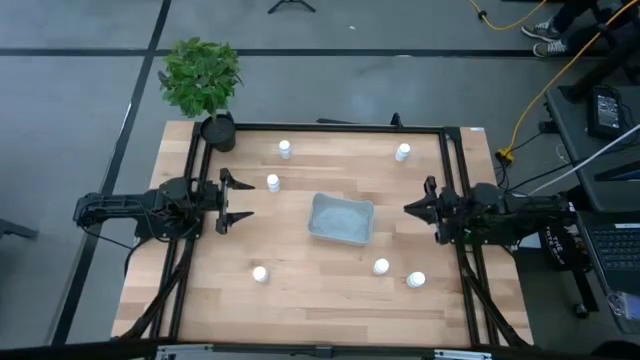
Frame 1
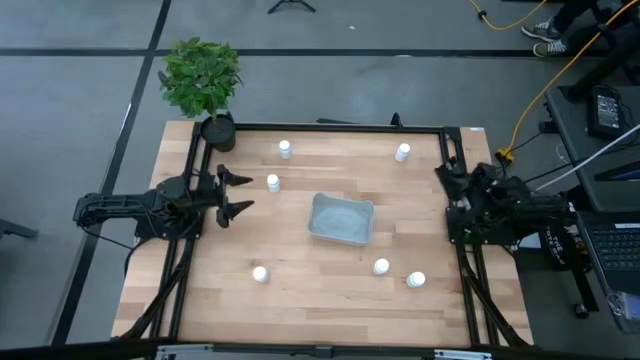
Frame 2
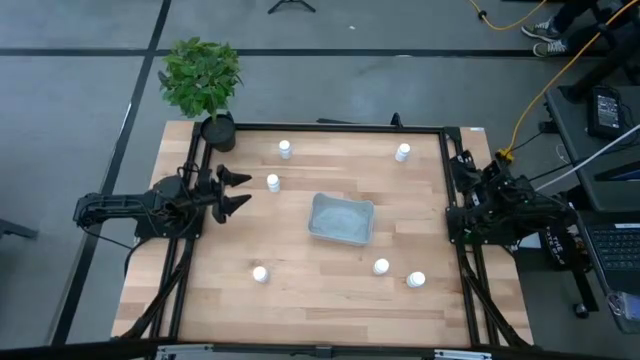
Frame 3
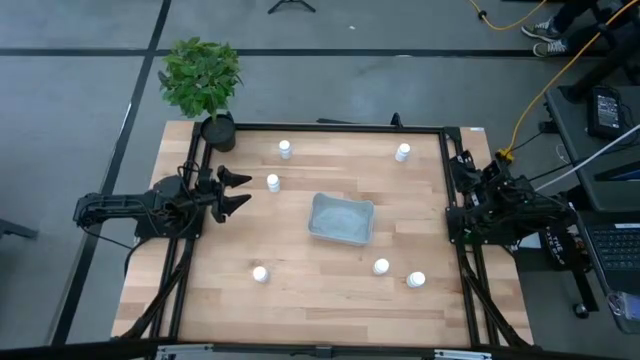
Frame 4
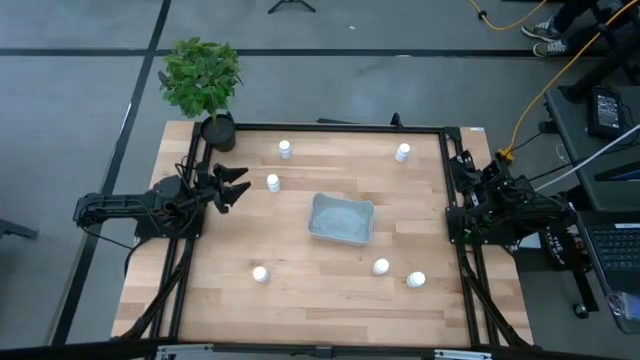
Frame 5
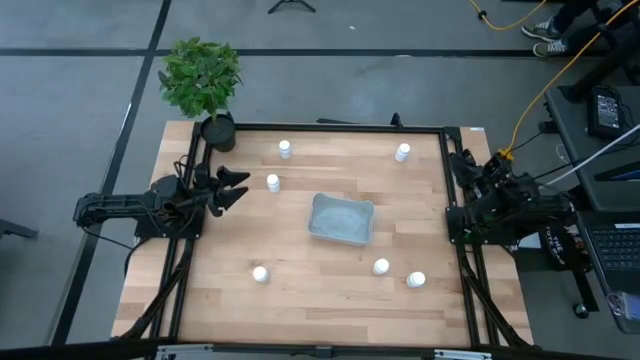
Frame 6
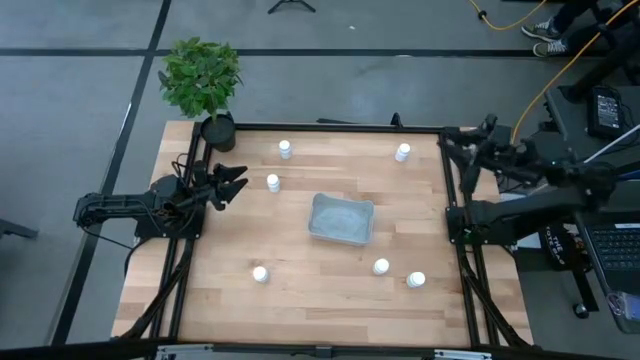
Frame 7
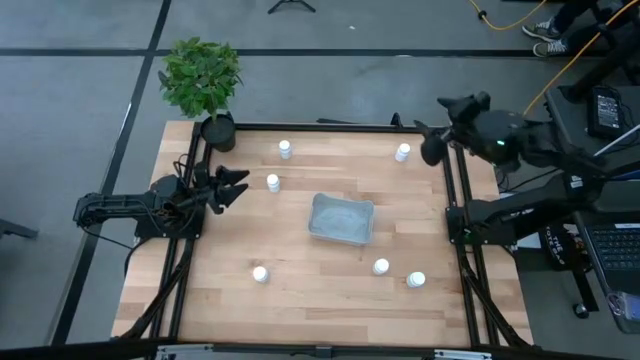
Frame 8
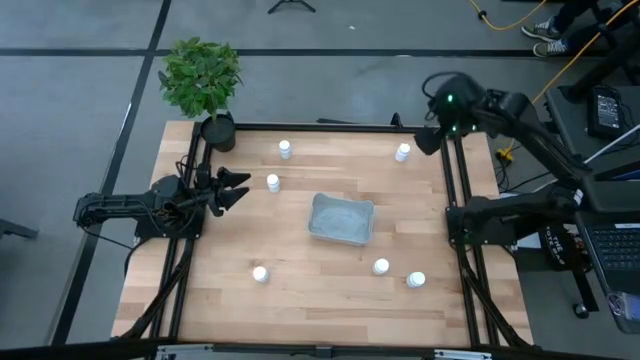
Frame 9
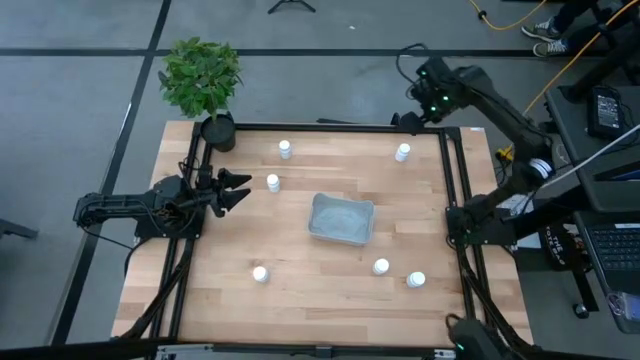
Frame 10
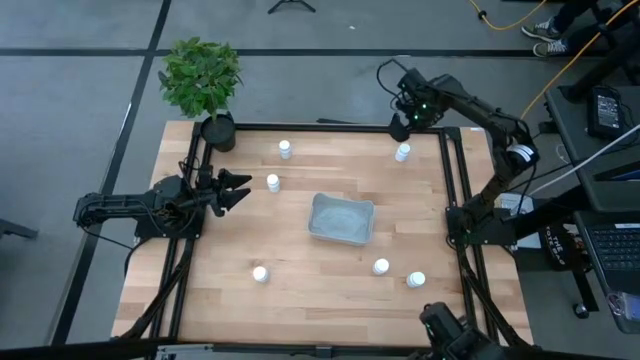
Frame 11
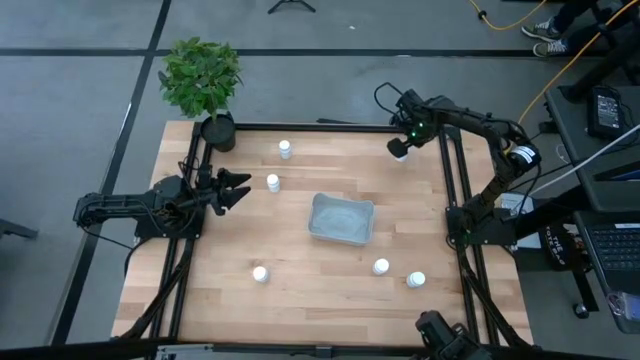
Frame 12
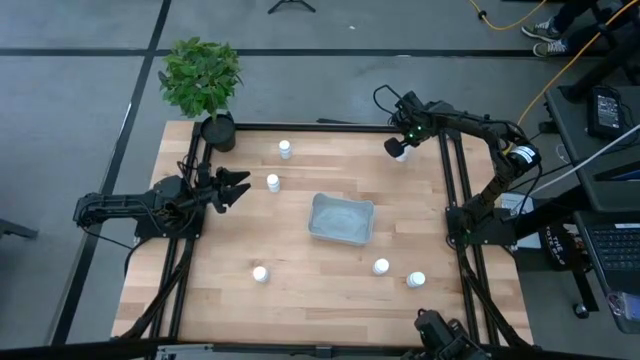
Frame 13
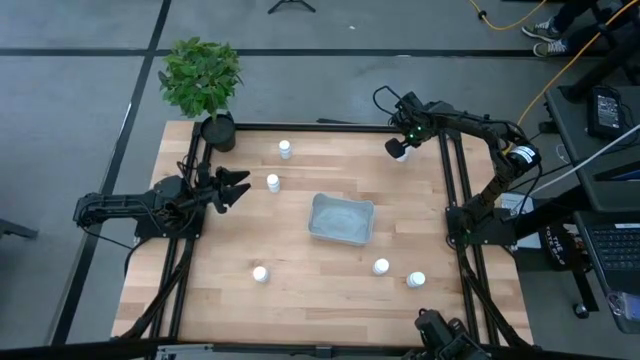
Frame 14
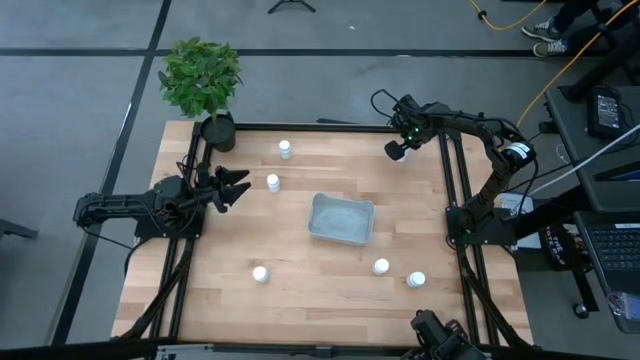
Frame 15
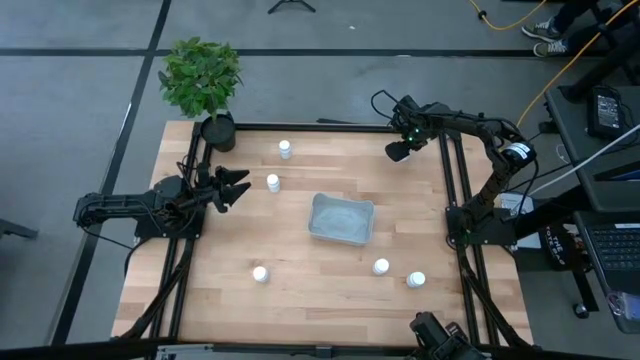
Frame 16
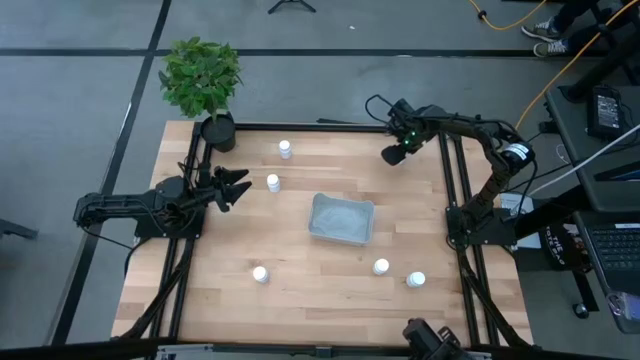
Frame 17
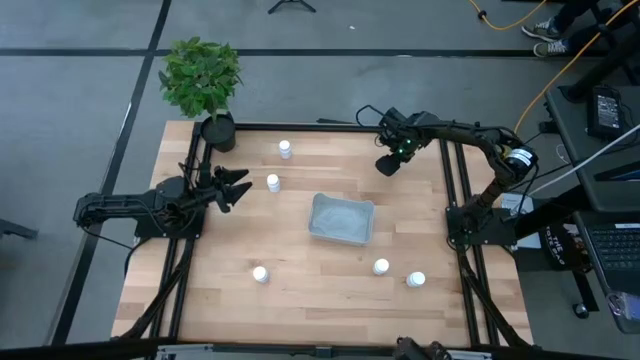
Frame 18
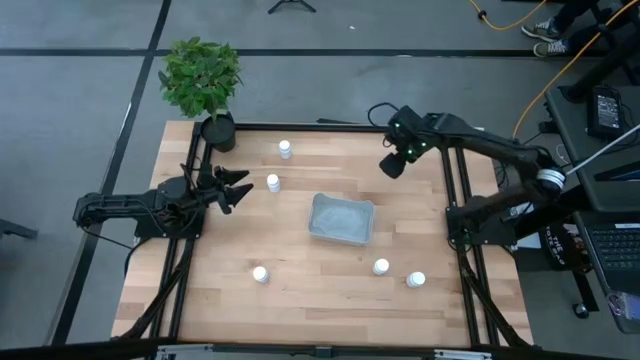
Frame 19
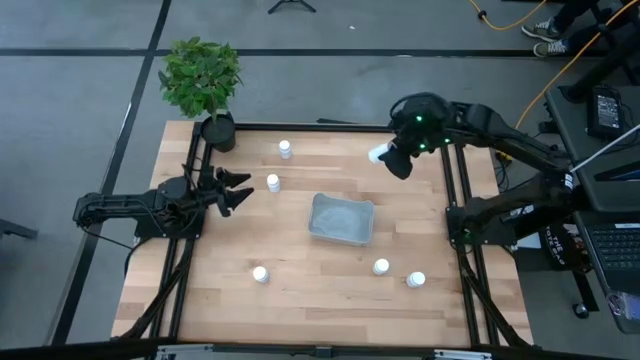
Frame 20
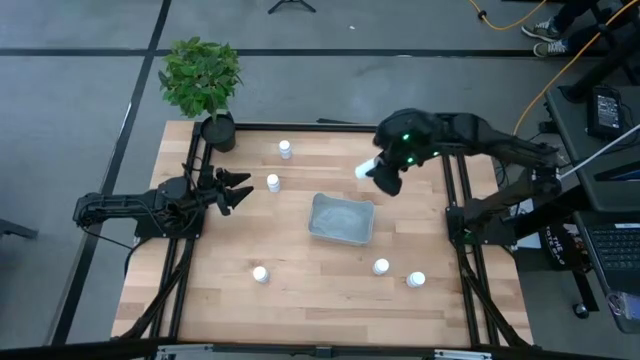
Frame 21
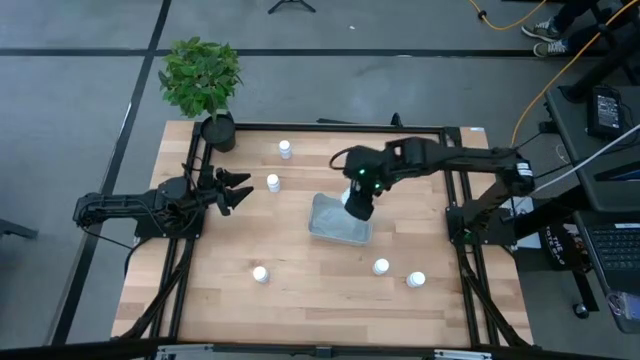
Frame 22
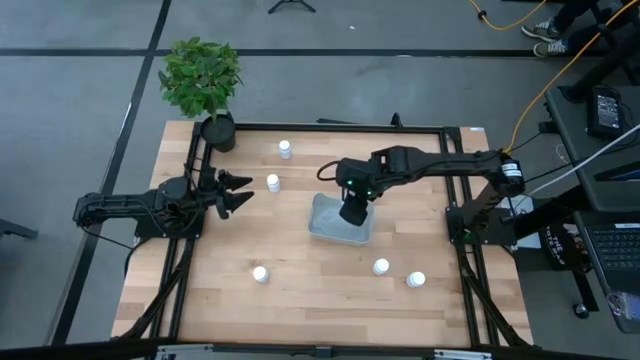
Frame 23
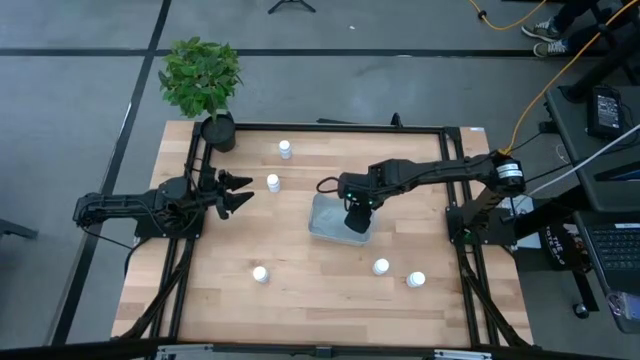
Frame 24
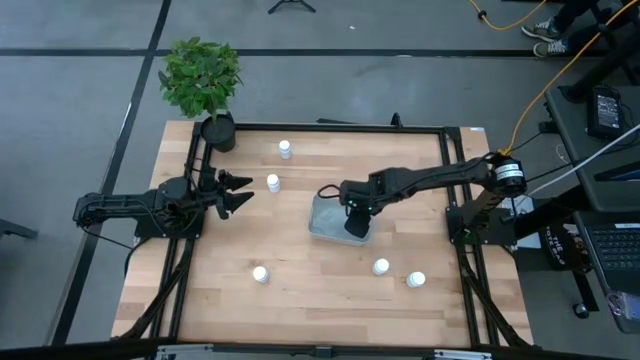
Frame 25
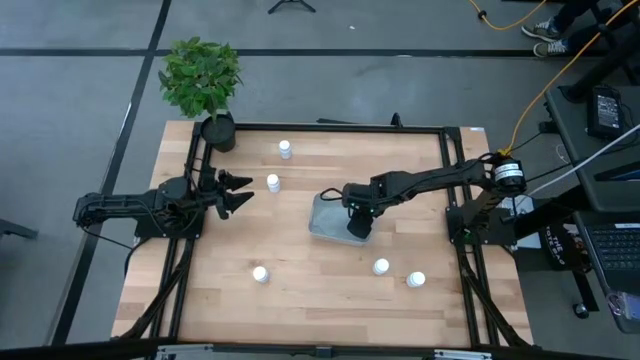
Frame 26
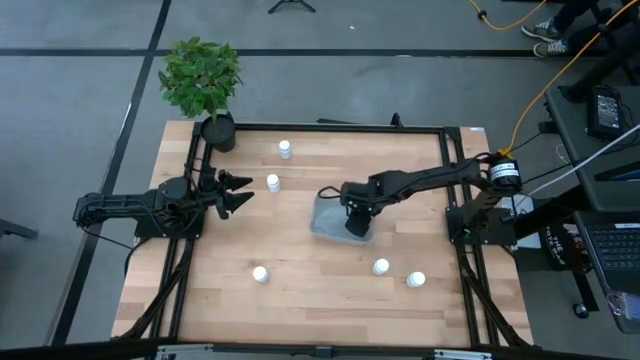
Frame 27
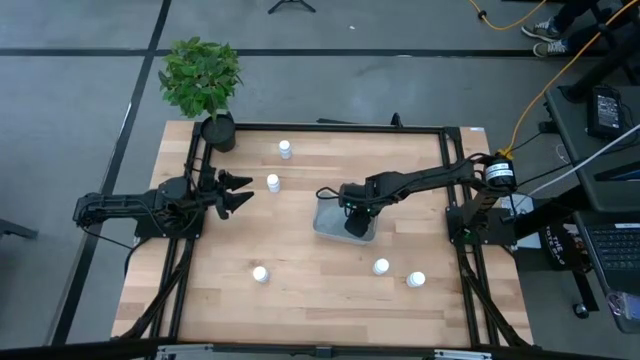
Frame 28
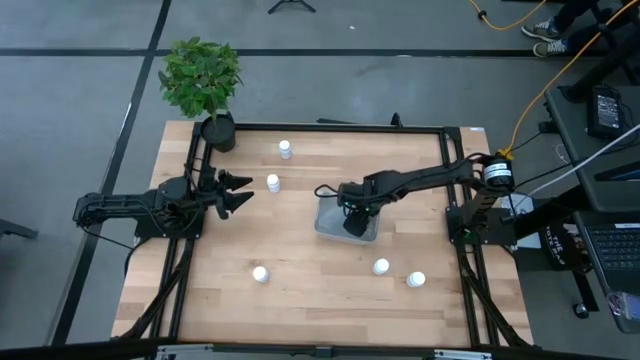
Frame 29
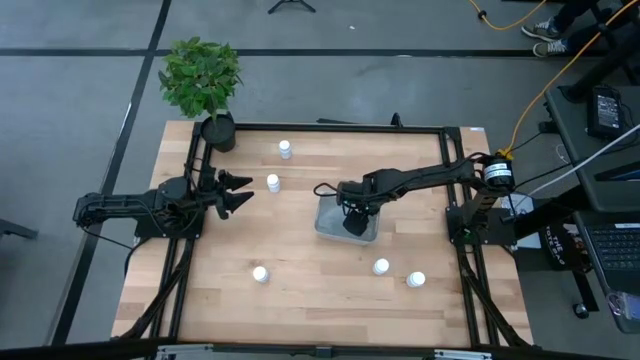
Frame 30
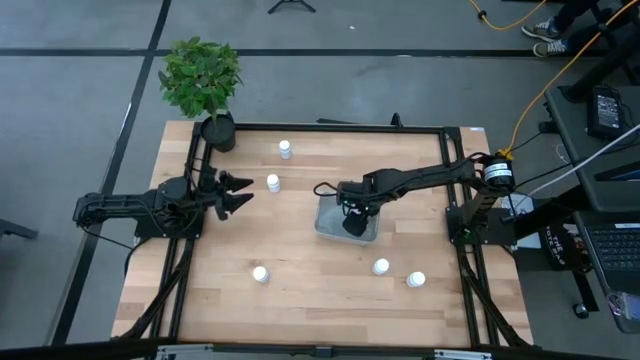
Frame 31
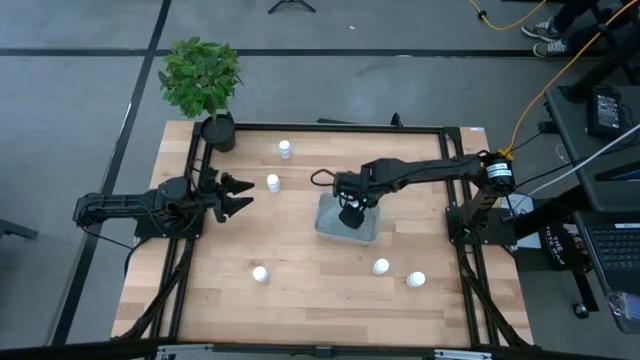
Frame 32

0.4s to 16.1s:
Task: Pick and place pill bottles into a basket
Put the top white small pill bottle into the bin

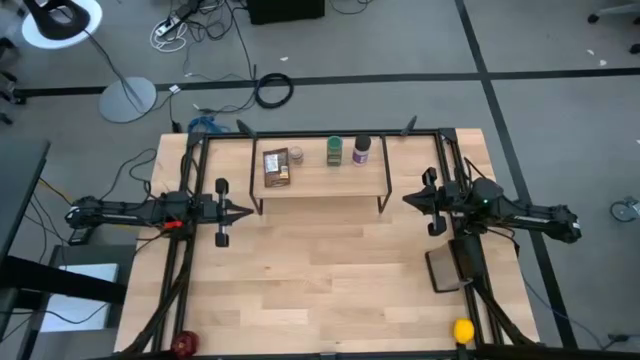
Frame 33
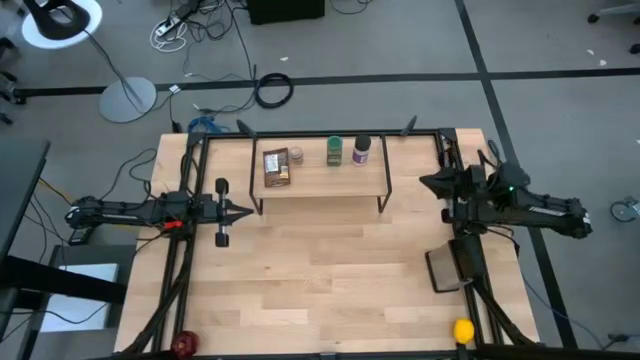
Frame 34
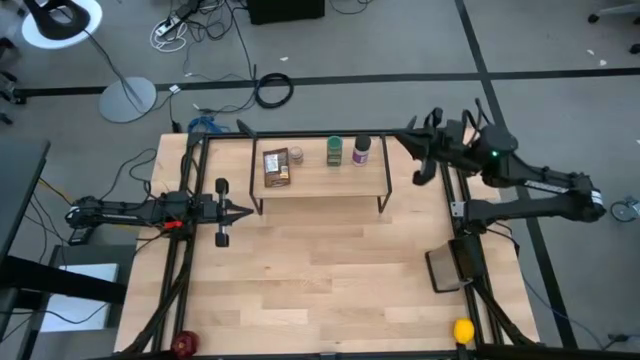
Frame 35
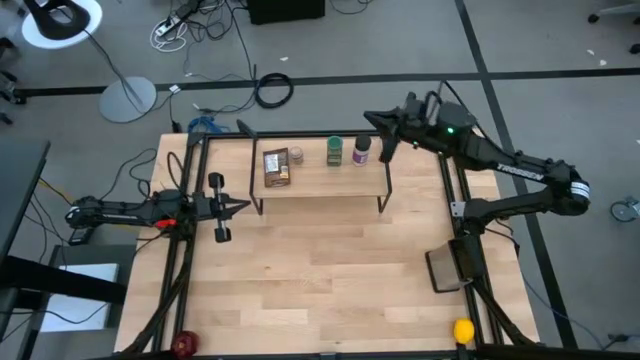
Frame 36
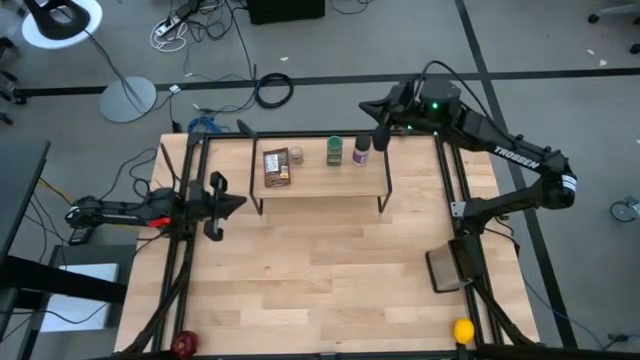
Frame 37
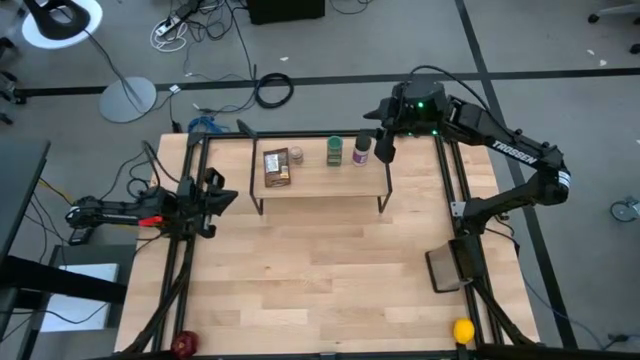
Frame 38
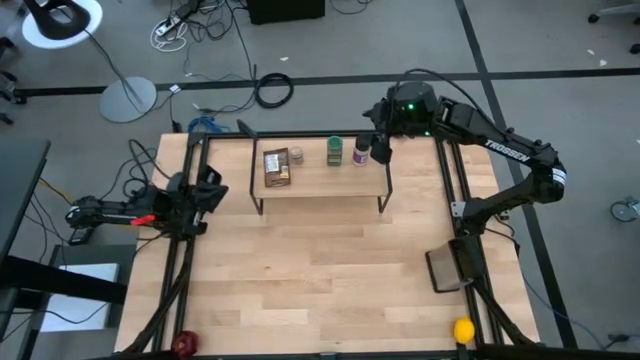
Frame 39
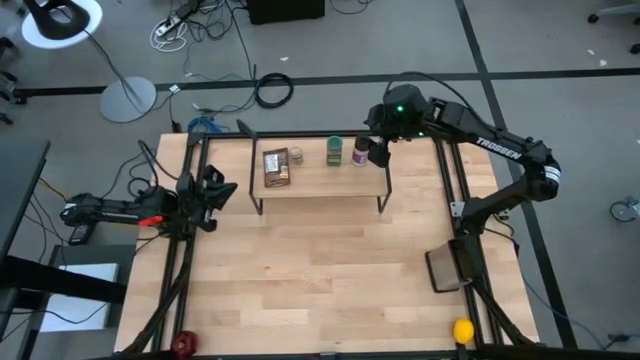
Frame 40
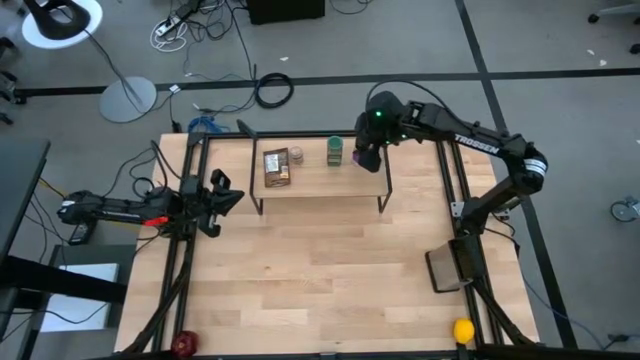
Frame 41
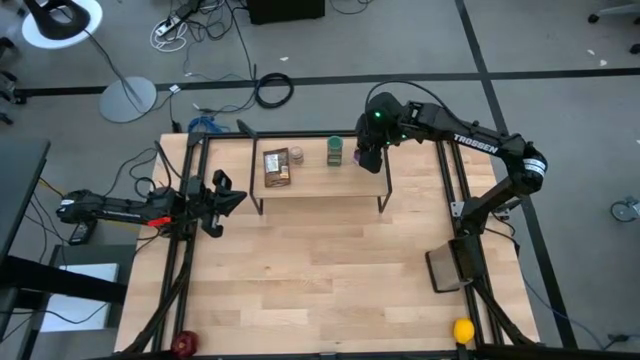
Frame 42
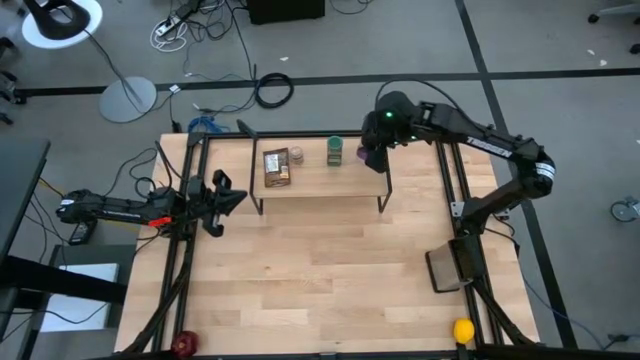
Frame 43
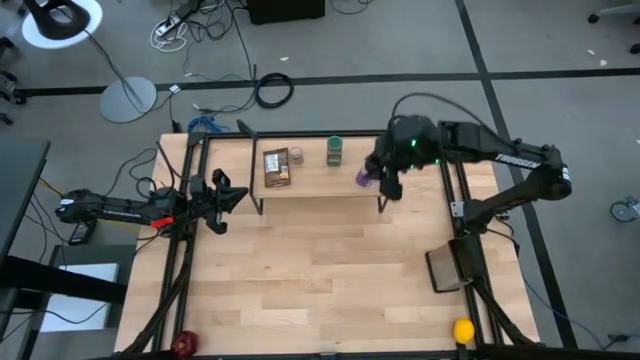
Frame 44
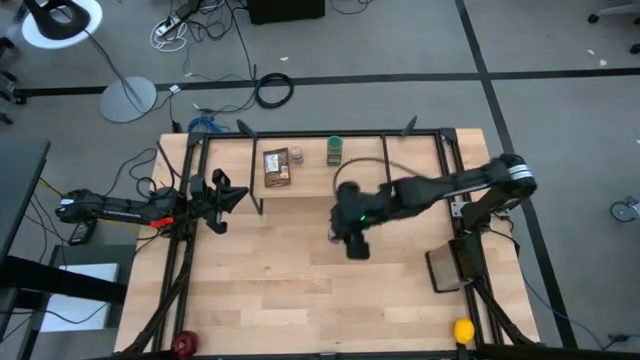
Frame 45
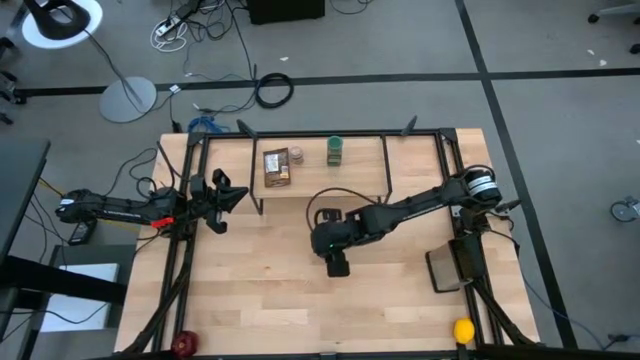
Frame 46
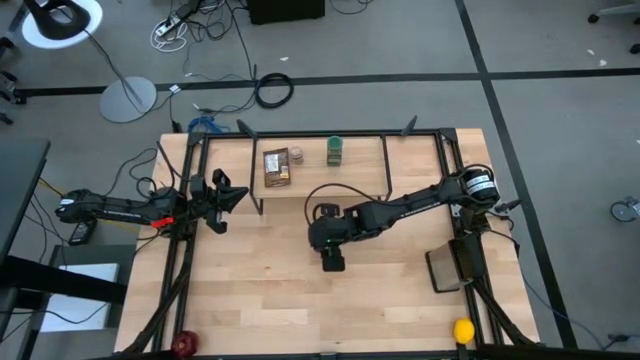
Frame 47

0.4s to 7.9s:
Task: Shelf spices
Remove the purple seasoning bottle from the shelf
